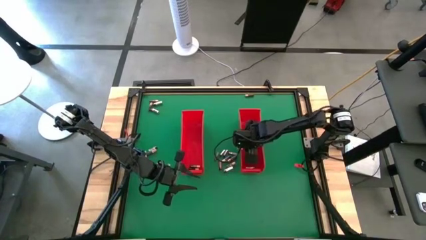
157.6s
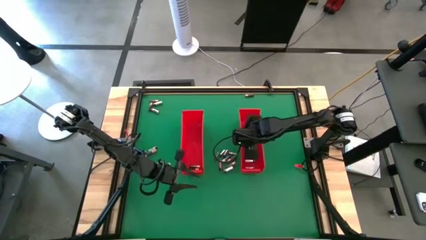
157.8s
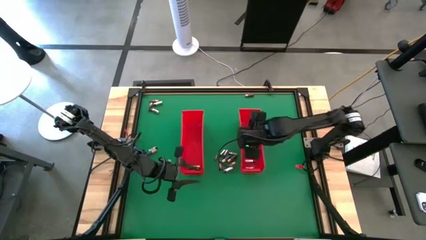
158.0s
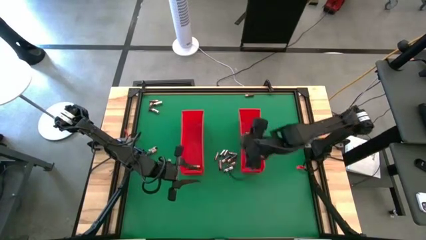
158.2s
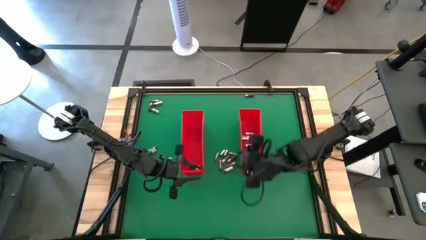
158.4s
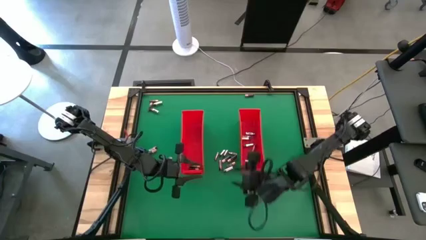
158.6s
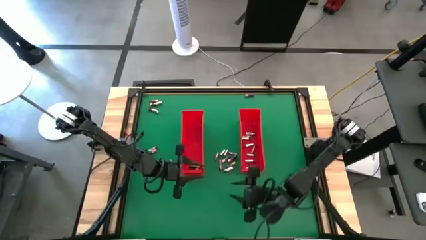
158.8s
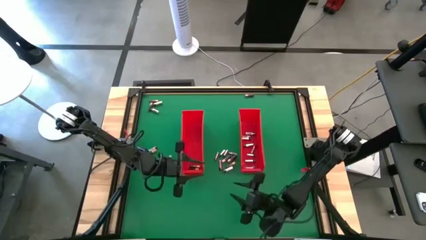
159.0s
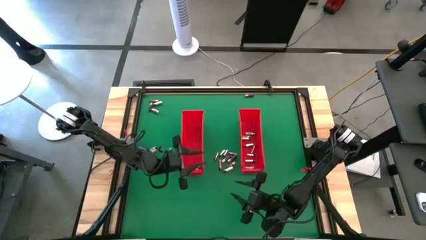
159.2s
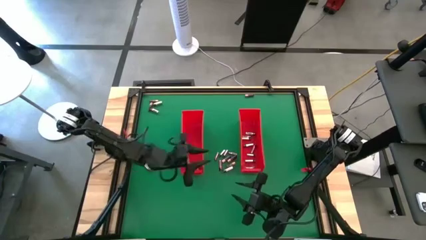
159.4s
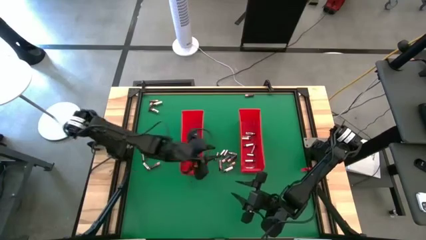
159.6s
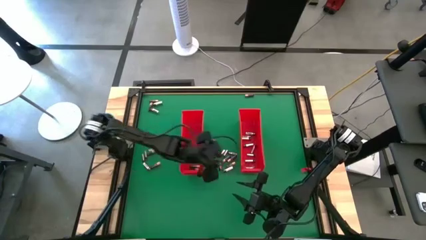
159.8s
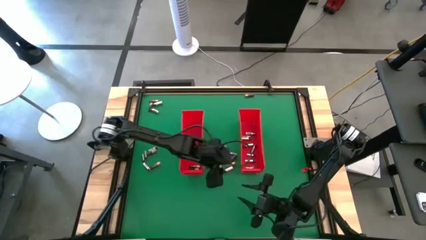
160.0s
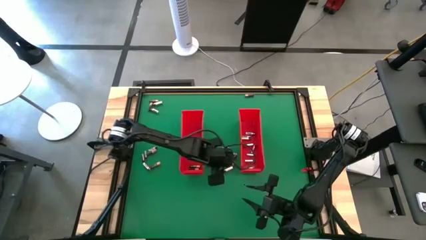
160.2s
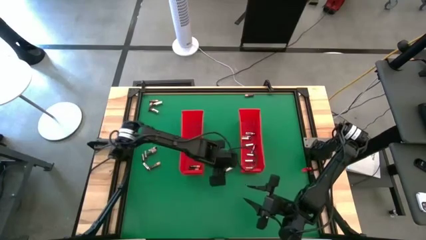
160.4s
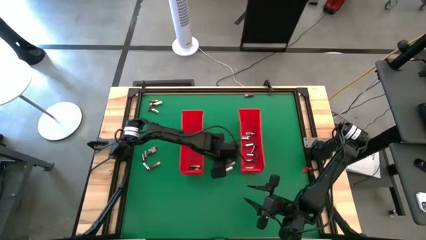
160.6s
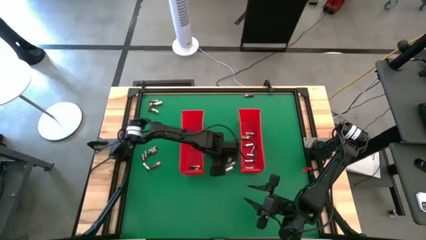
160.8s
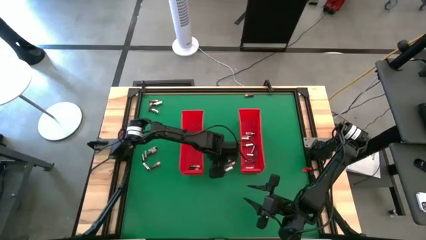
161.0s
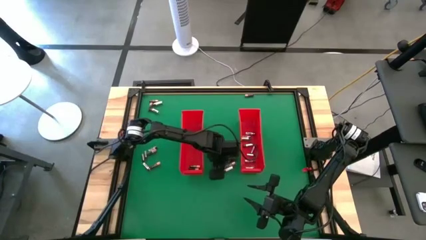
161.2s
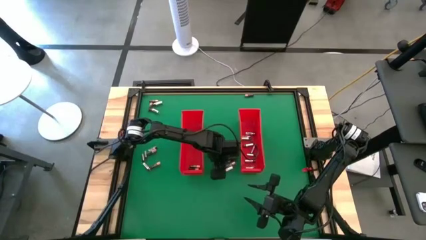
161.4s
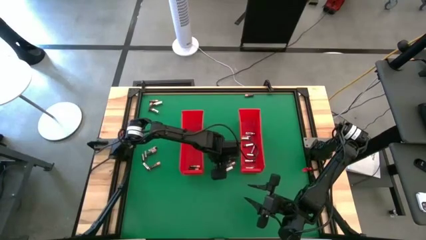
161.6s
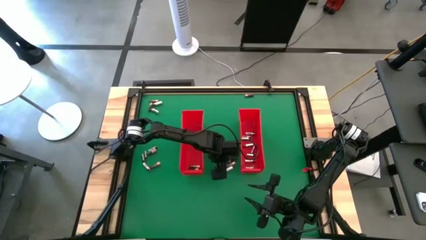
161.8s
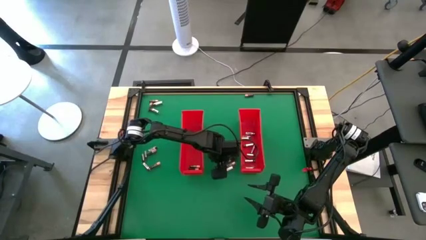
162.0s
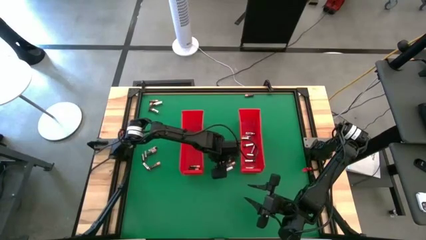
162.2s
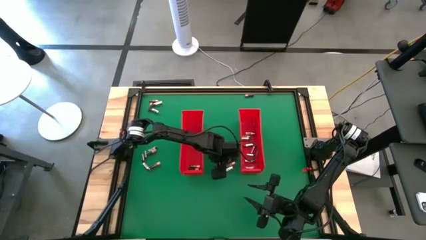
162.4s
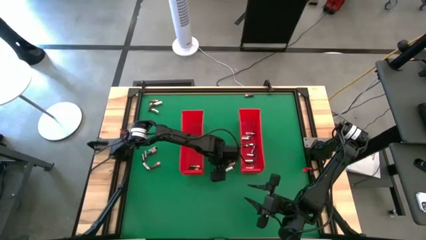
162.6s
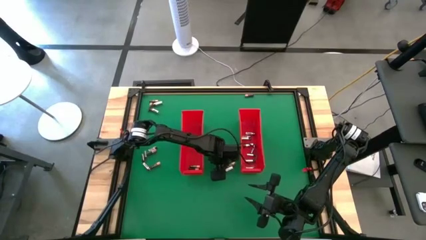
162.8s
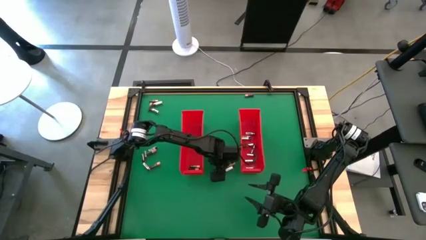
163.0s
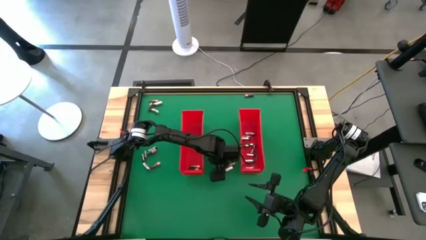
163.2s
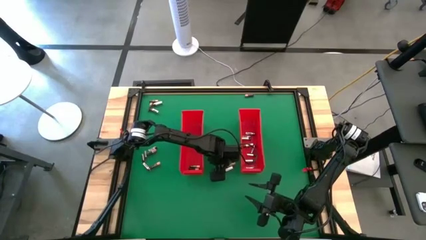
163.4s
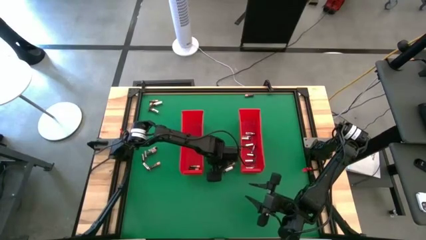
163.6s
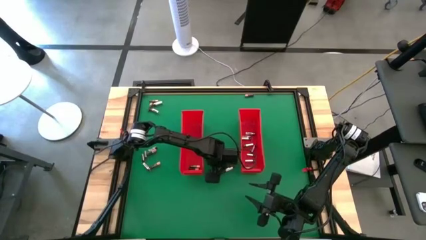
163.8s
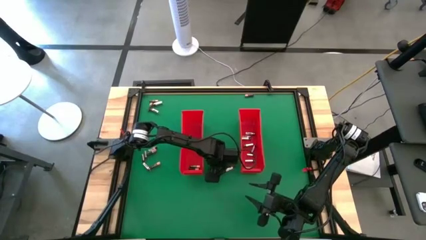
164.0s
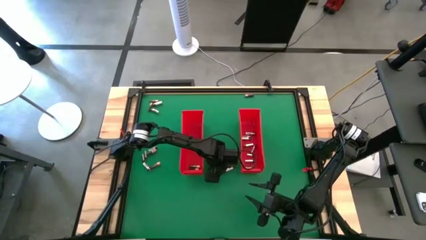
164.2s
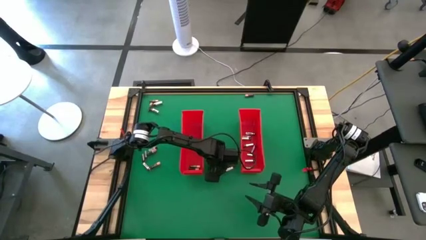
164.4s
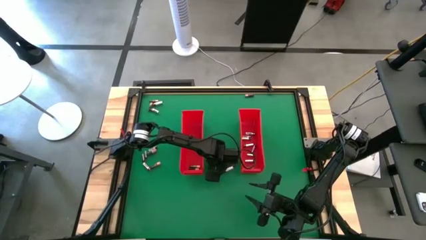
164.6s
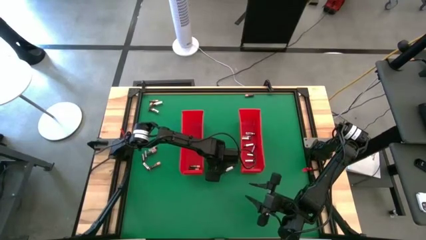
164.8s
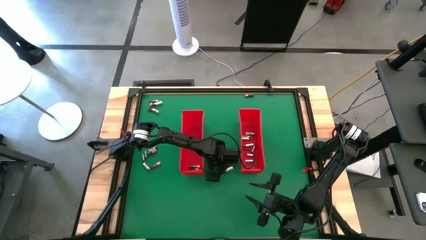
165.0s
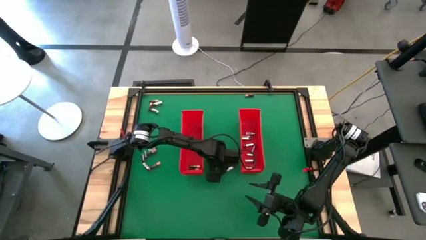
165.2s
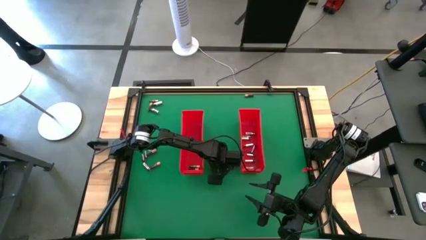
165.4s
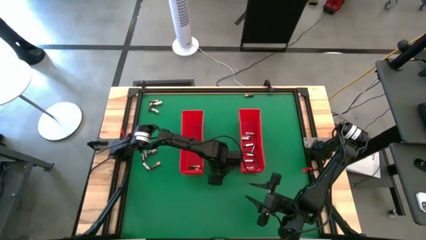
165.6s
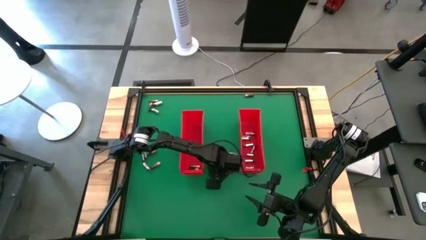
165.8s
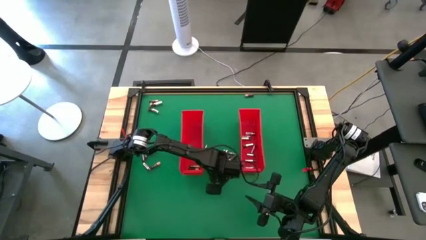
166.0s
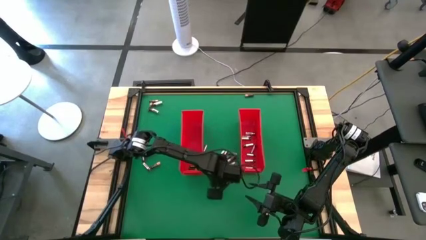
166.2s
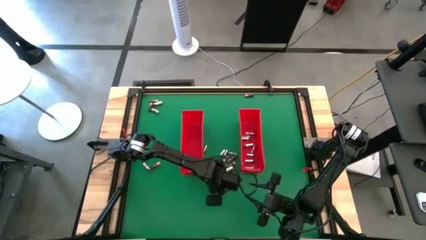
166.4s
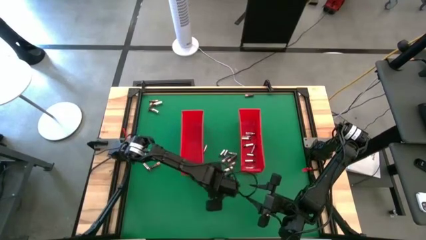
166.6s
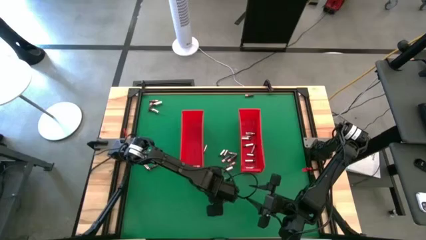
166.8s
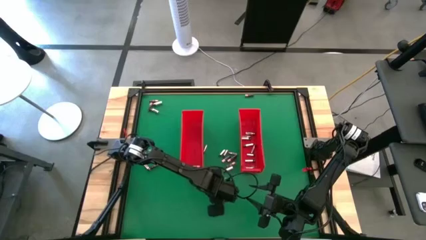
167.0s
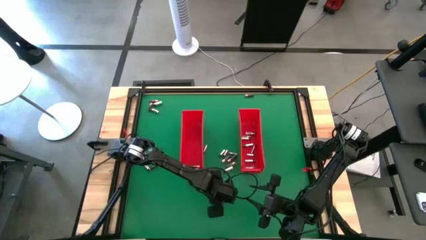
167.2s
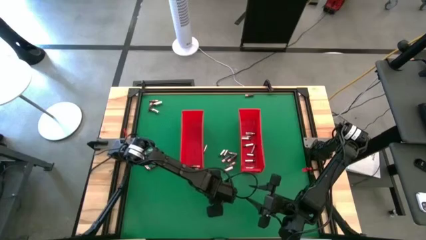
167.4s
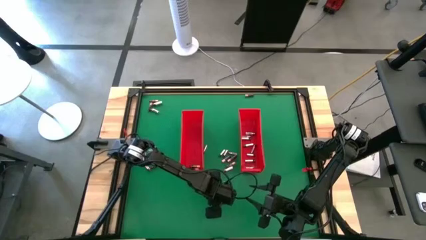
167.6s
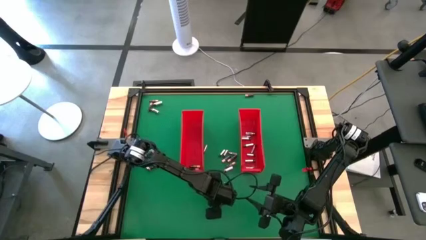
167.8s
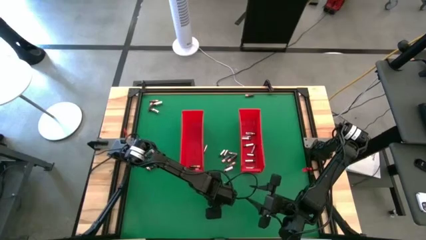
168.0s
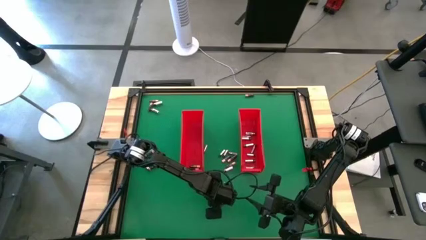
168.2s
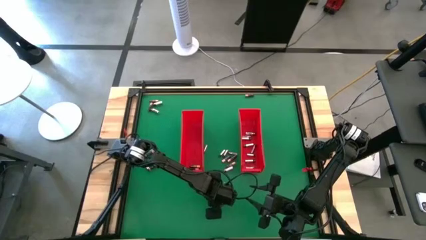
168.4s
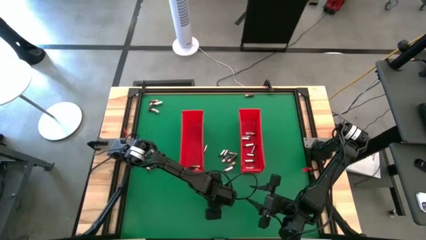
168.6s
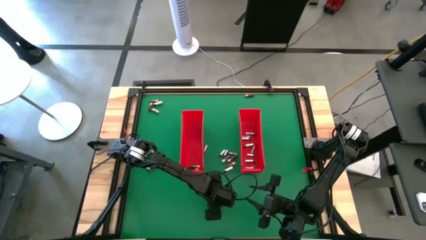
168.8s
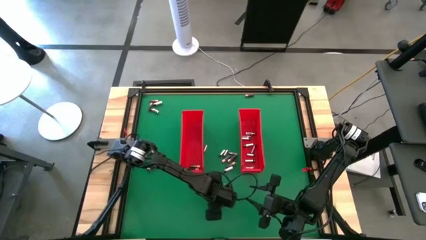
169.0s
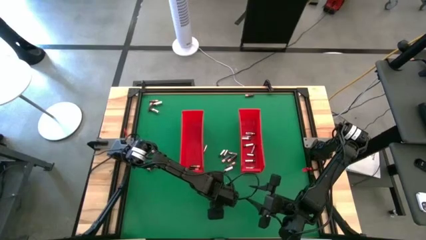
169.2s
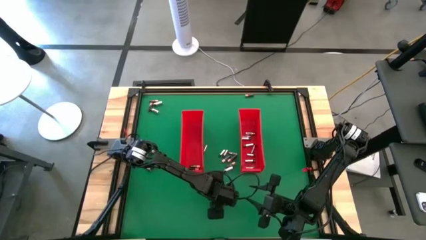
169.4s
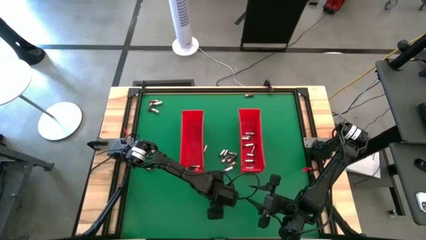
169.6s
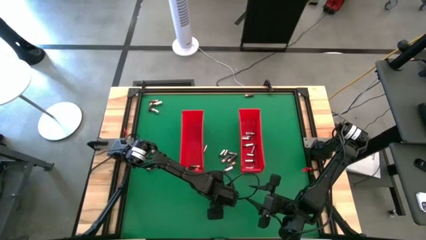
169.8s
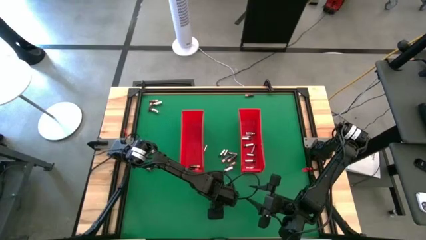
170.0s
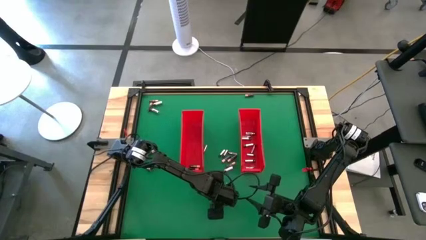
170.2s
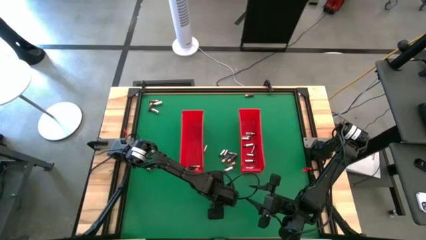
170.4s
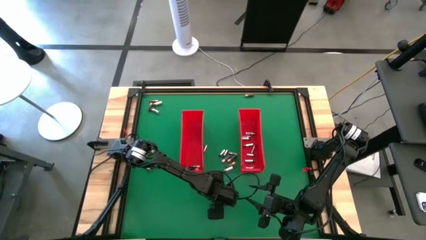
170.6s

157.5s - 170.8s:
Task: Sort batteries
Put the silver battery into the right red bin
